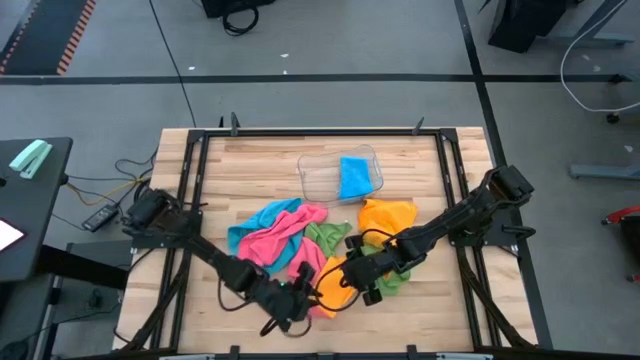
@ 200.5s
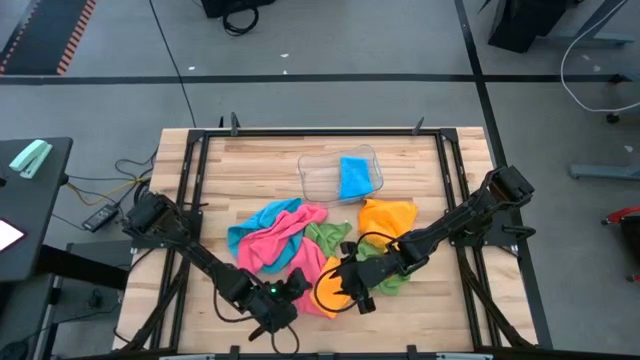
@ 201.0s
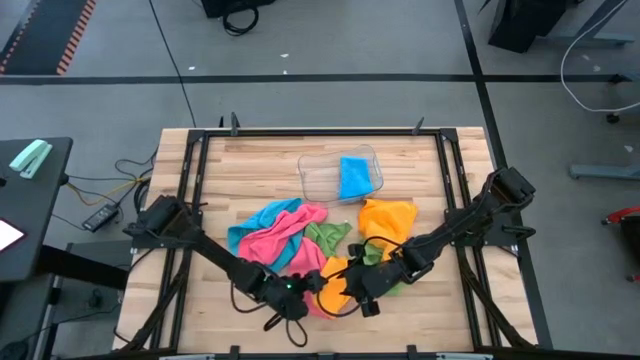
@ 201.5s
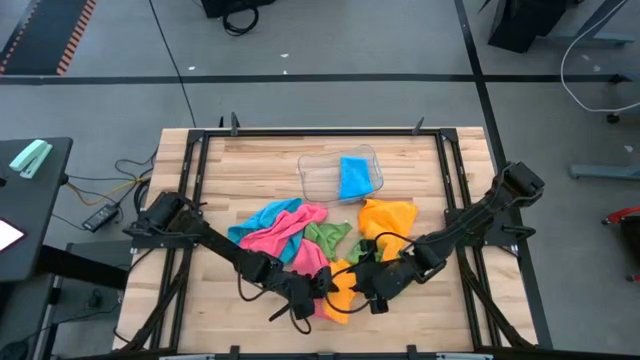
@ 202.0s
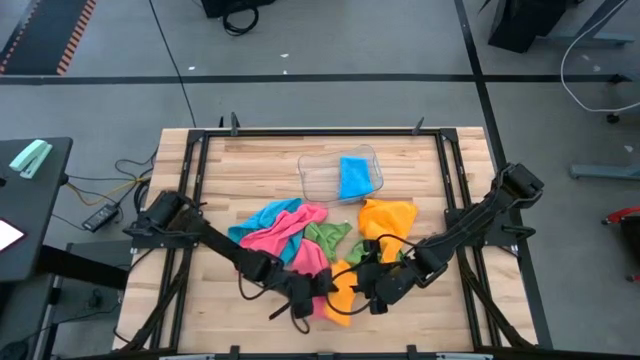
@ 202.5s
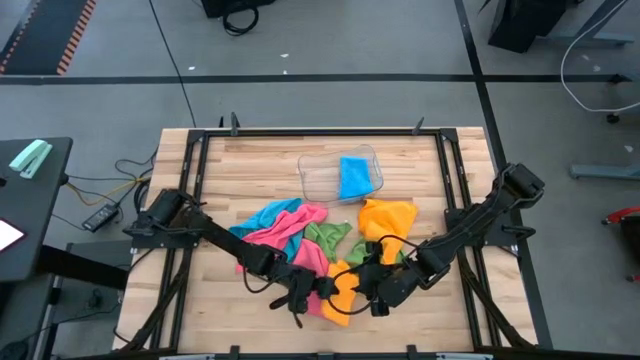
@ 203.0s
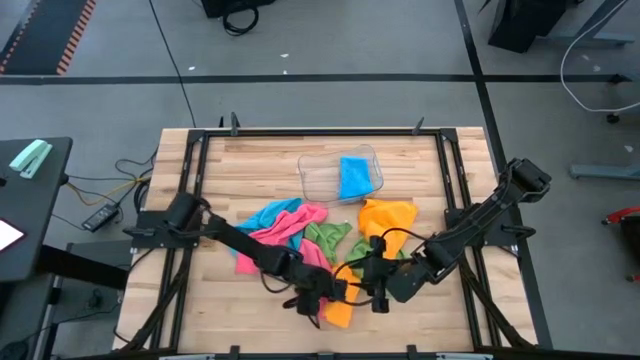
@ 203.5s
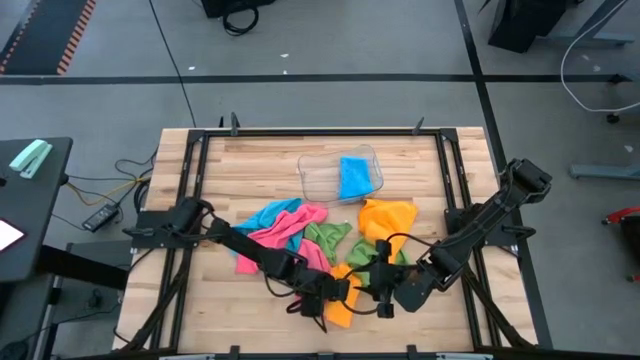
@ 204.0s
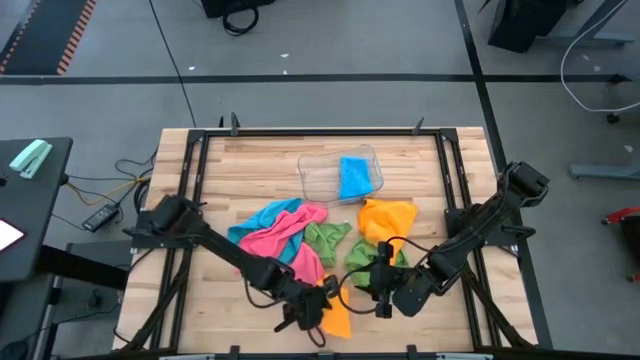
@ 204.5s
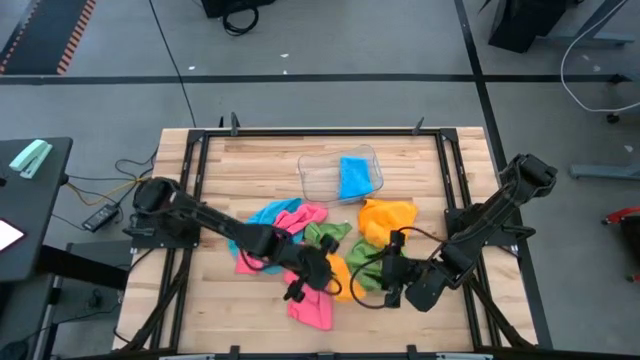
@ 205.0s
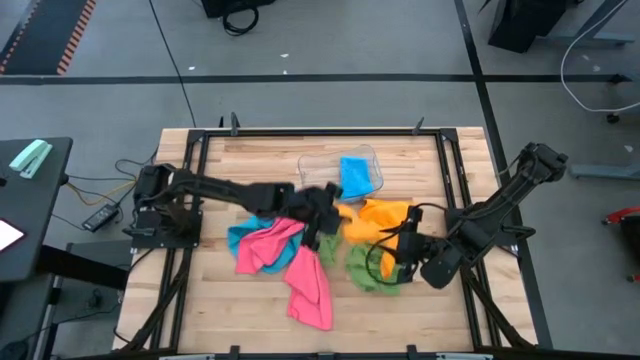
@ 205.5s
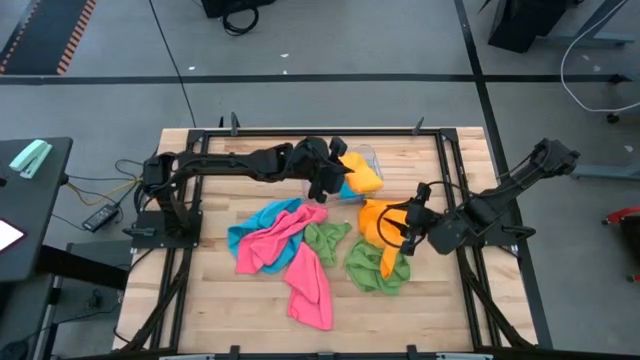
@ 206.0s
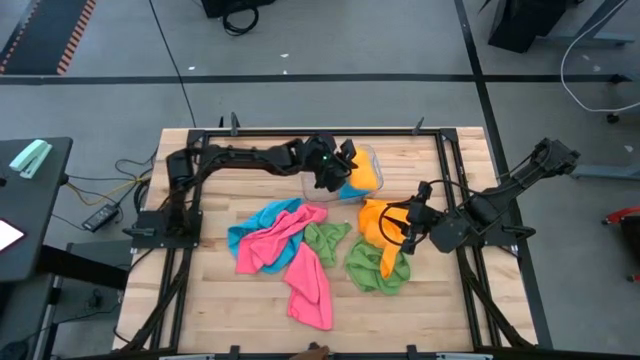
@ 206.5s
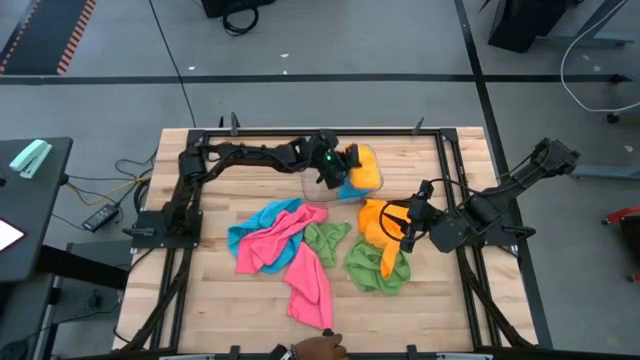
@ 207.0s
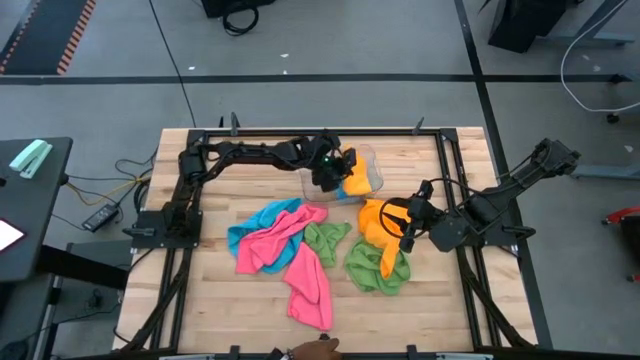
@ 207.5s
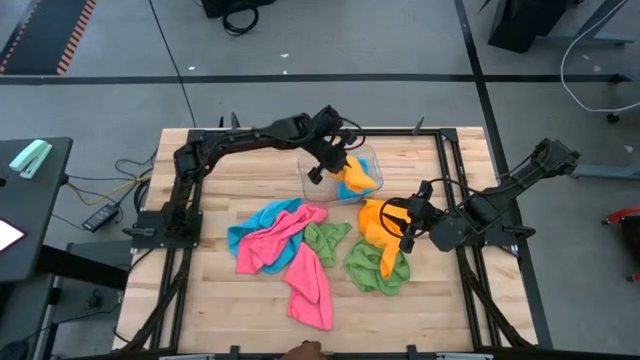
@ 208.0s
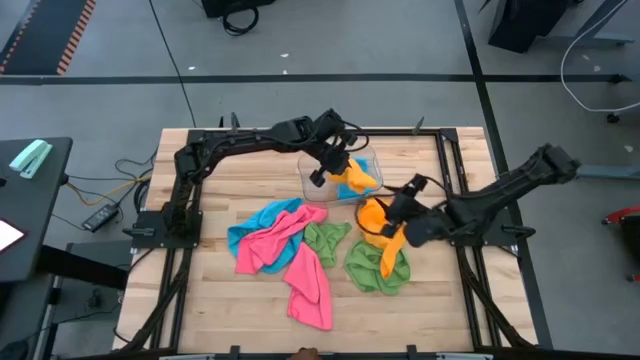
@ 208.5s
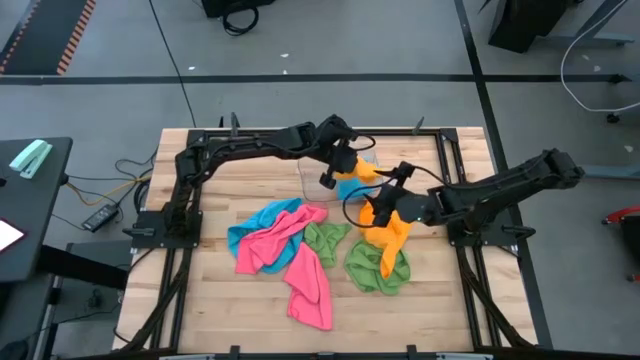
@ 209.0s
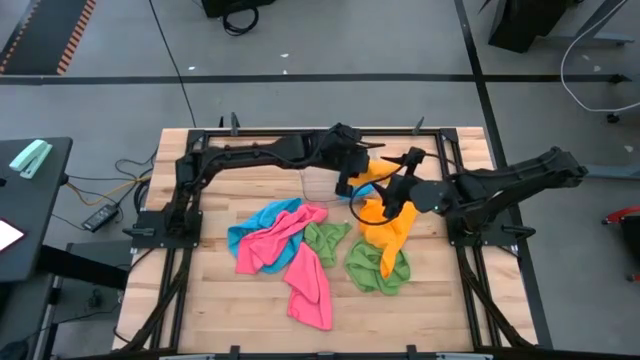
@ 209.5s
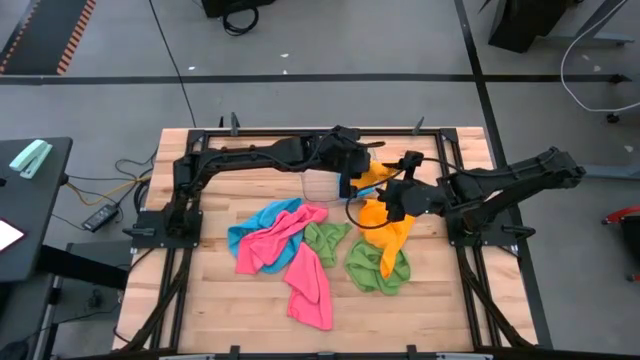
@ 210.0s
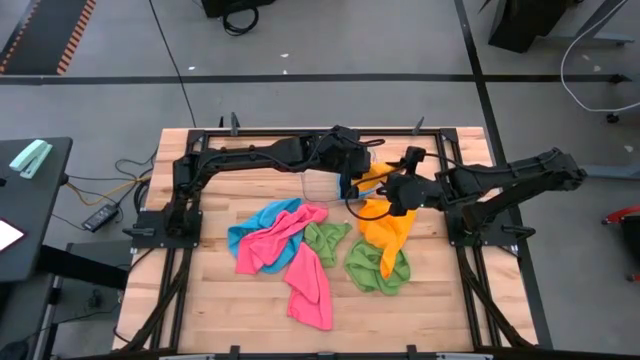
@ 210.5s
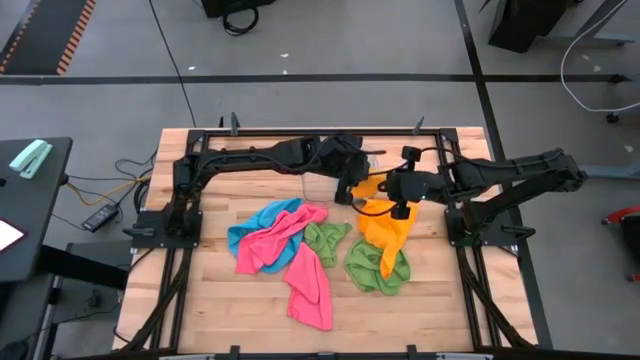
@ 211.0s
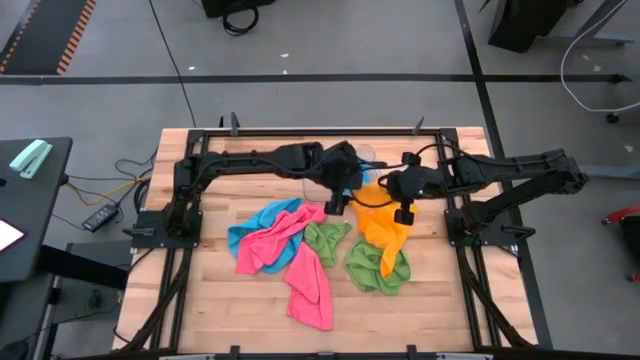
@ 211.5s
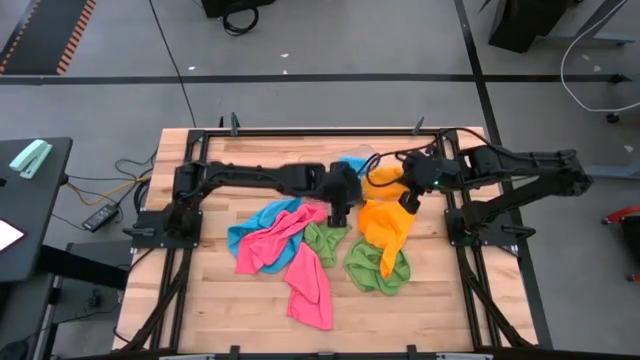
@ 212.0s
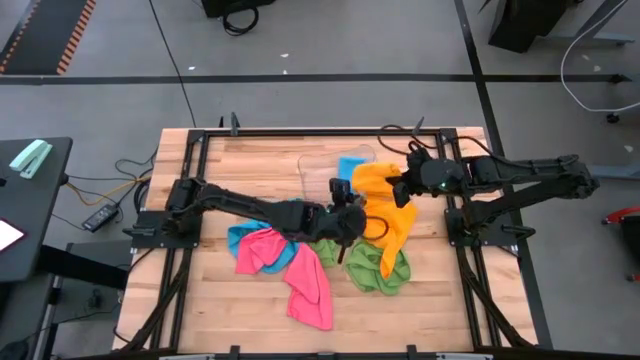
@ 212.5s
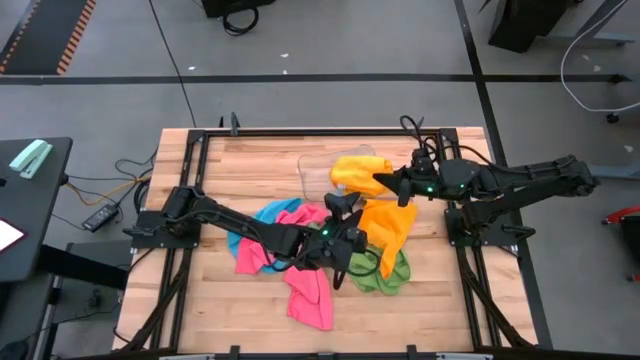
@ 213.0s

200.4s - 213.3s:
Task: Fold microfiber towels
Put the folded yellow microfiber cloth on the transparent bin

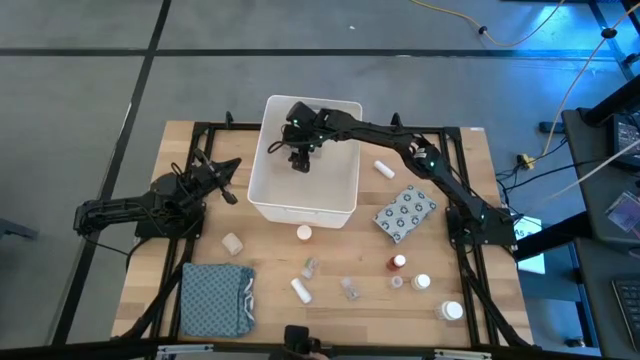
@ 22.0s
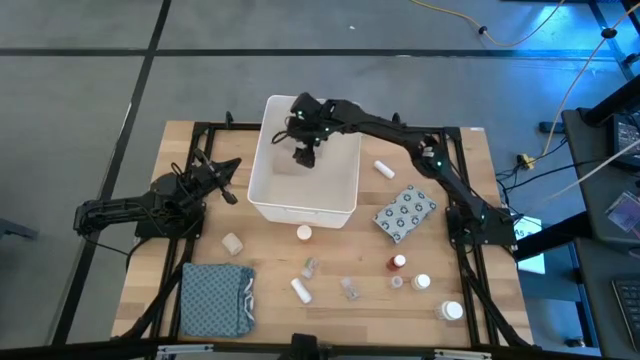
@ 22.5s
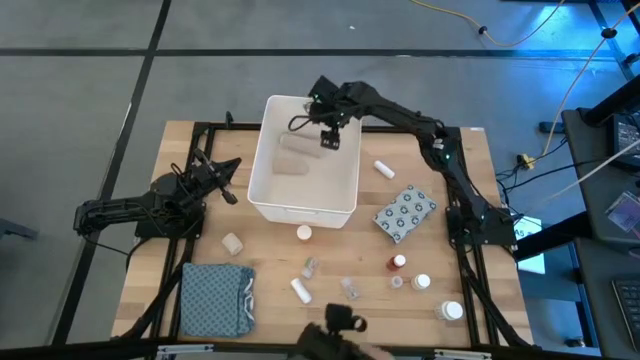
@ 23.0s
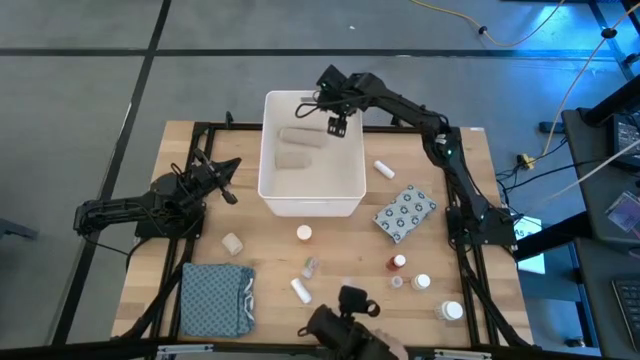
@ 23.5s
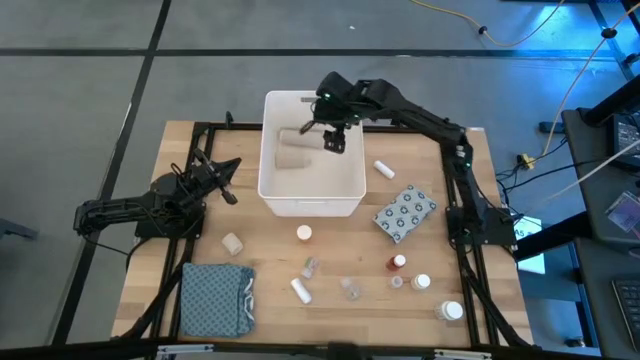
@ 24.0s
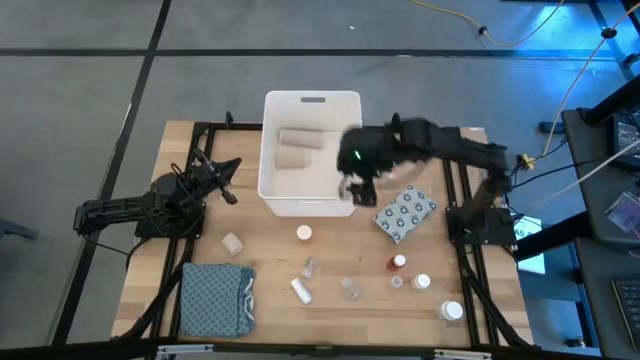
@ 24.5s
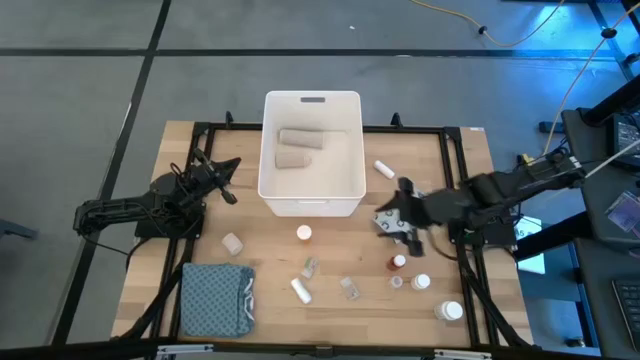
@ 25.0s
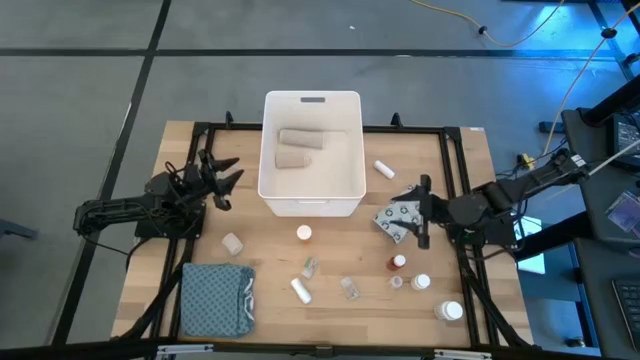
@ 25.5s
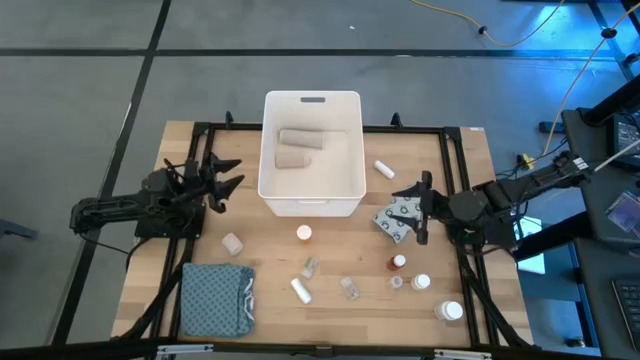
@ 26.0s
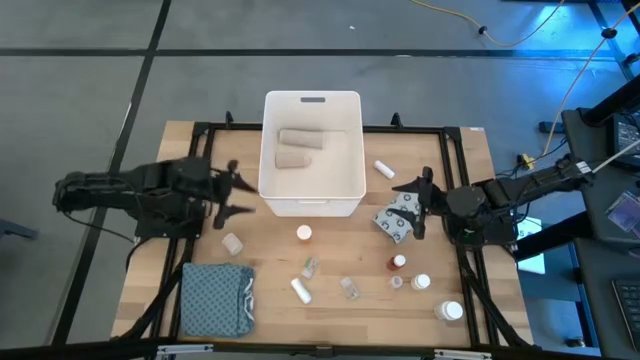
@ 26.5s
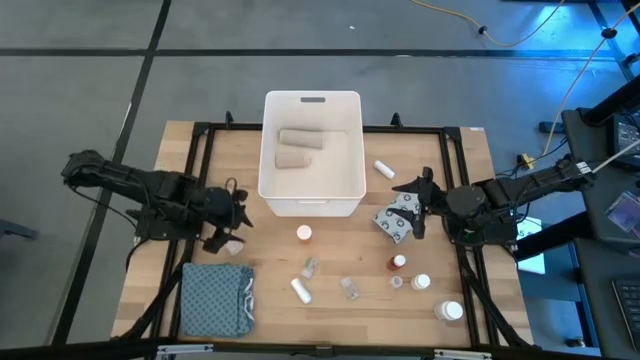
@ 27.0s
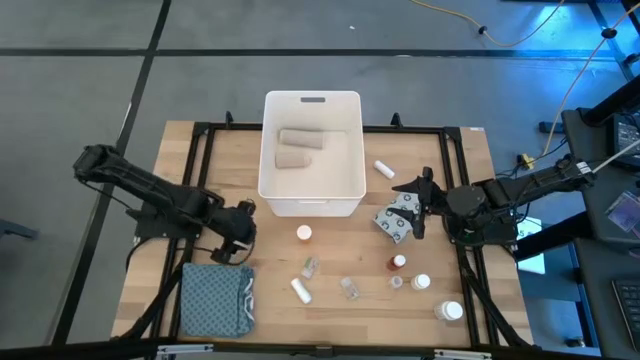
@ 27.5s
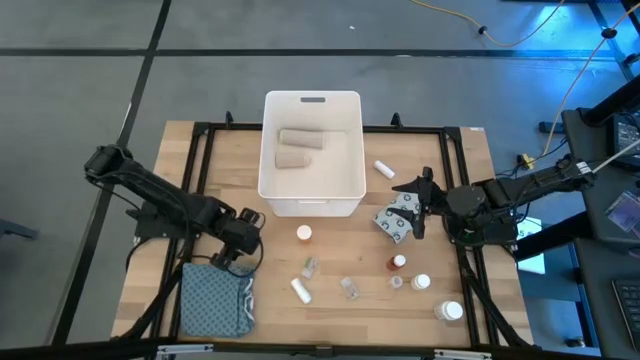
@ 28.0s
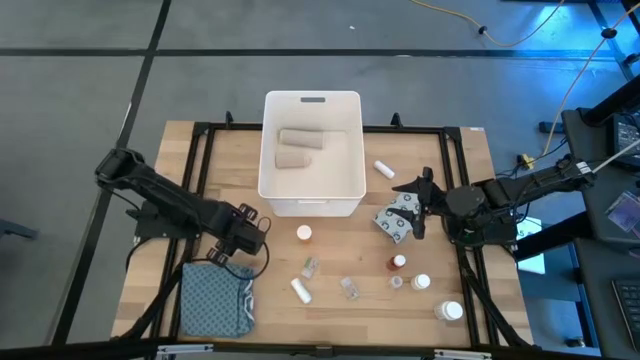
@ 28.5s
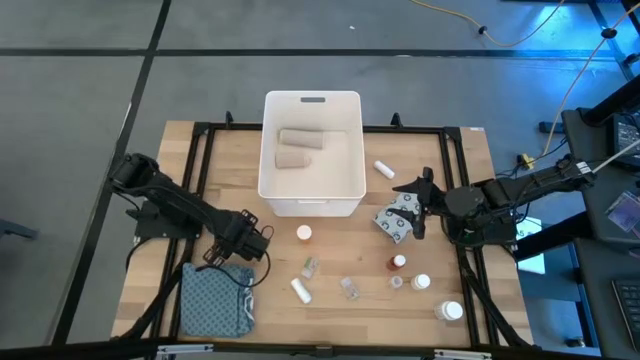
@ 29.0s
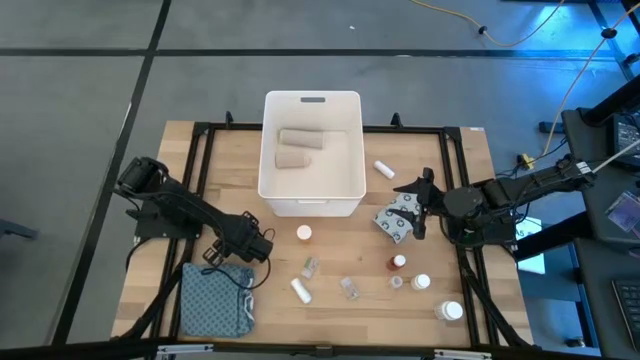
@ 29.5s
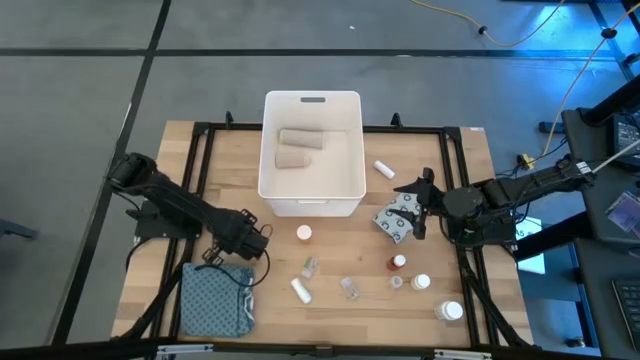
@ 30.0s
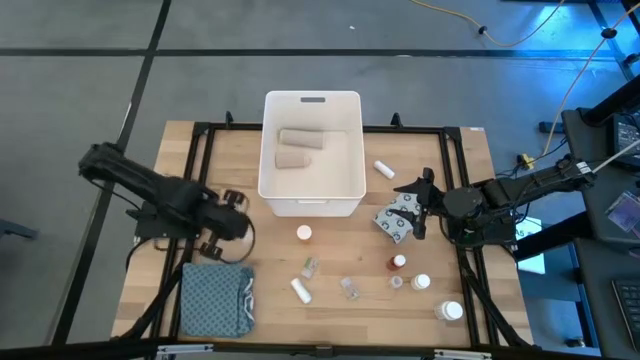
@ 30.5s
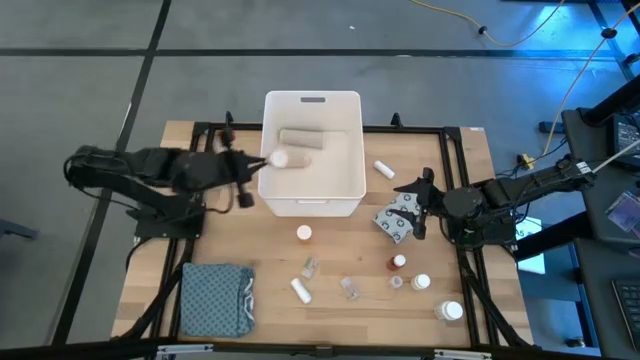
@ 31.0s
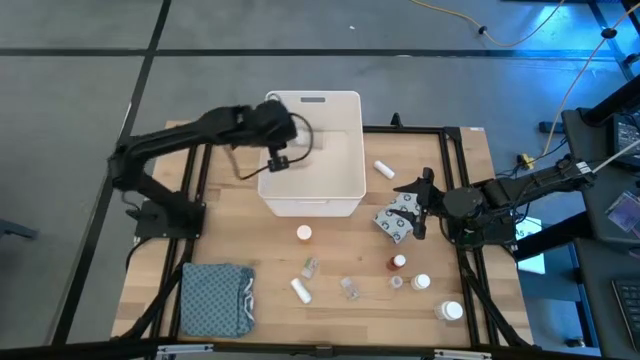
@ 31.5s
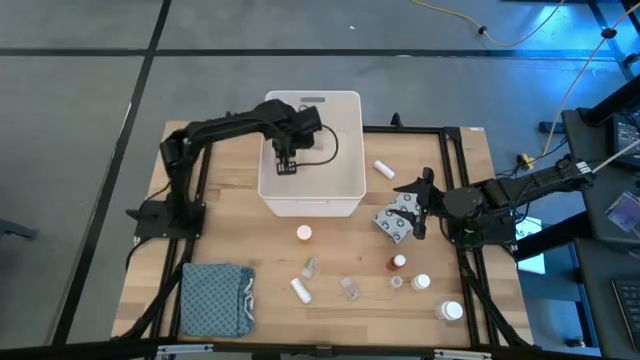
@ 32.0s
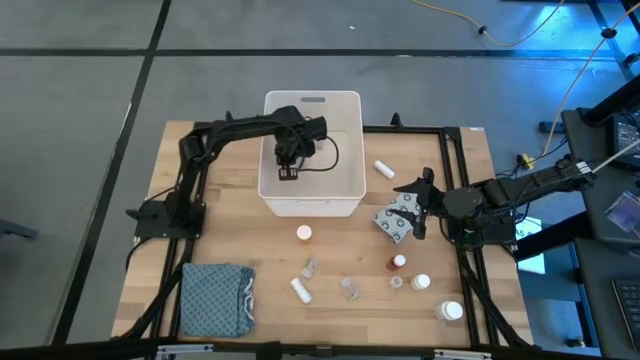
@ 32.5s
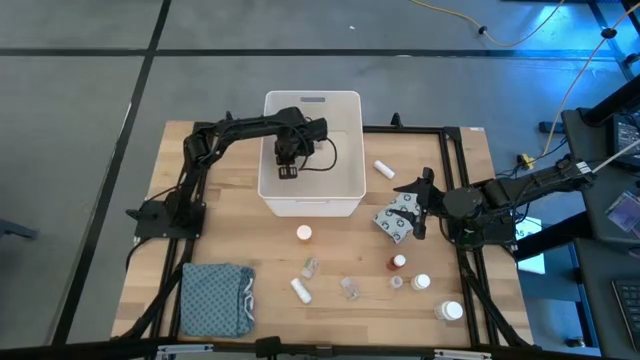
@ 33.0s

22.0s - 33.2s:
Task: Pick & place medical supplies in basket/bin
Put the rolled brown bandage into the white bin
